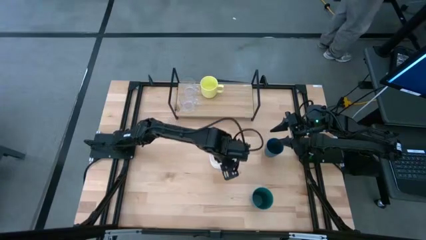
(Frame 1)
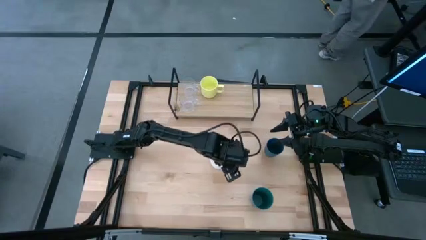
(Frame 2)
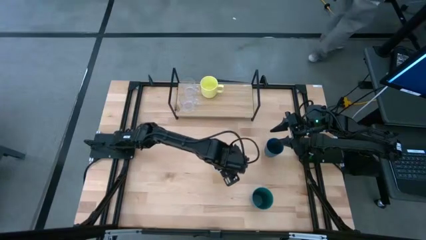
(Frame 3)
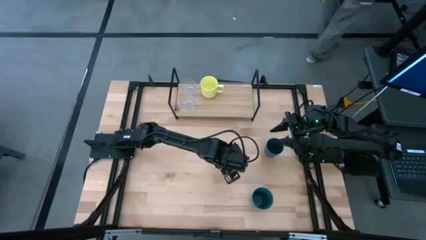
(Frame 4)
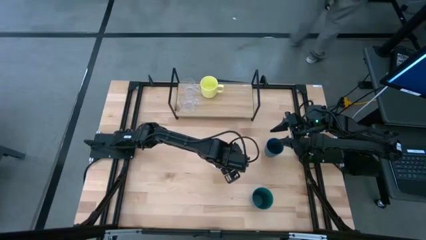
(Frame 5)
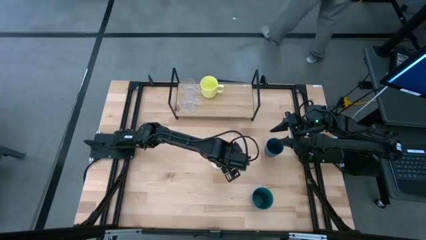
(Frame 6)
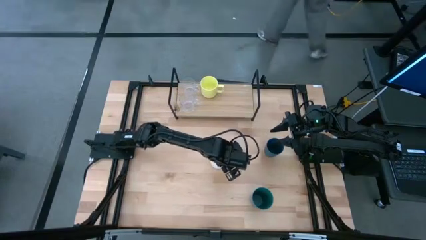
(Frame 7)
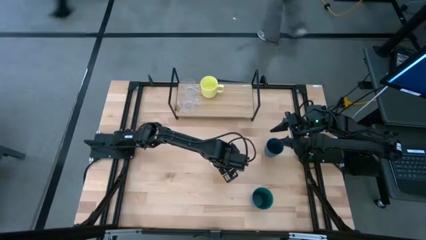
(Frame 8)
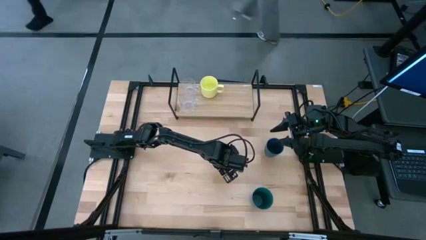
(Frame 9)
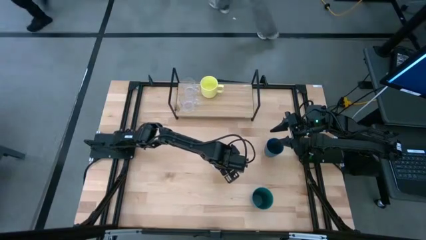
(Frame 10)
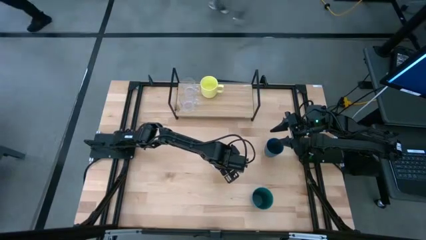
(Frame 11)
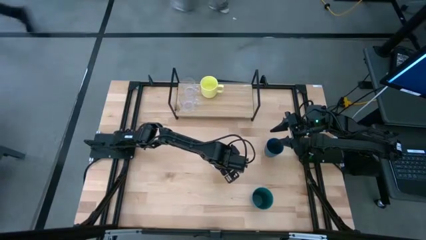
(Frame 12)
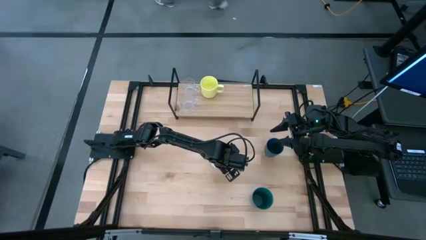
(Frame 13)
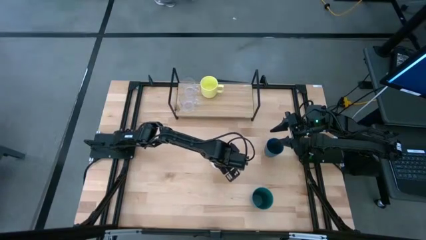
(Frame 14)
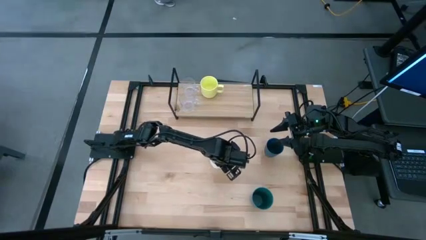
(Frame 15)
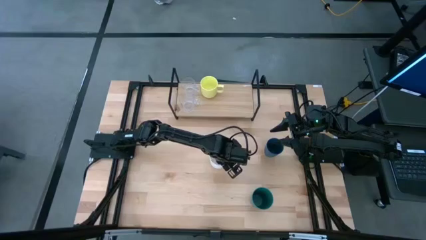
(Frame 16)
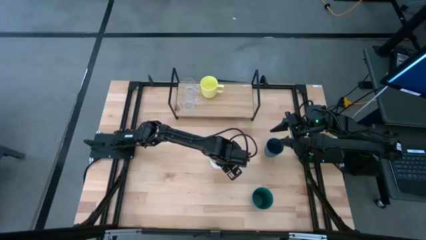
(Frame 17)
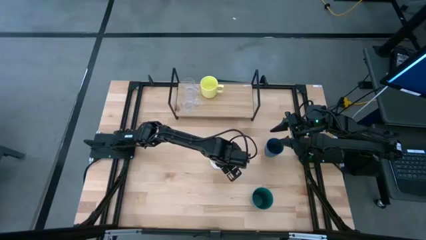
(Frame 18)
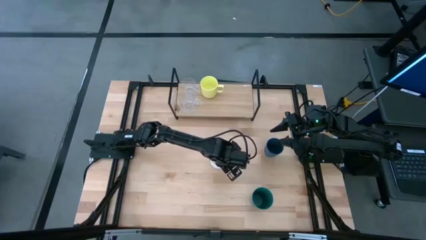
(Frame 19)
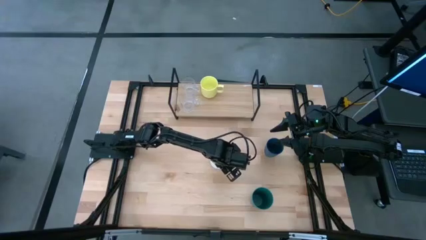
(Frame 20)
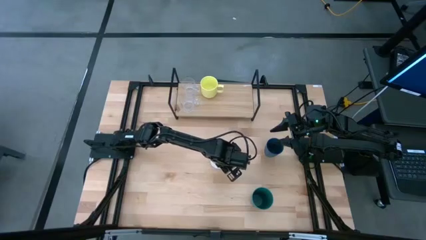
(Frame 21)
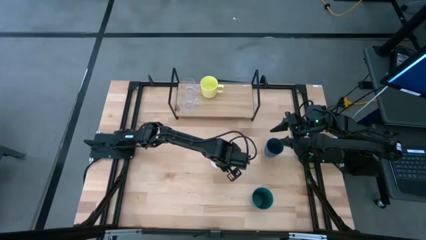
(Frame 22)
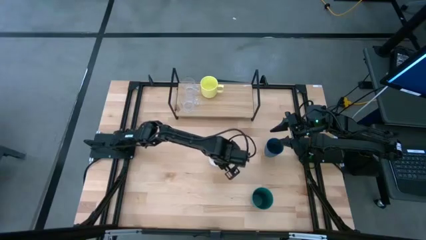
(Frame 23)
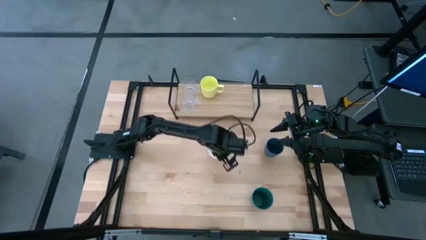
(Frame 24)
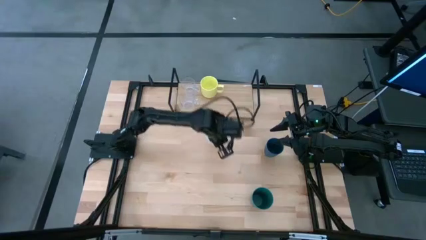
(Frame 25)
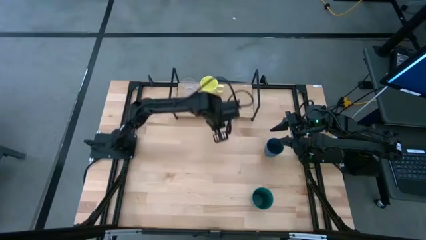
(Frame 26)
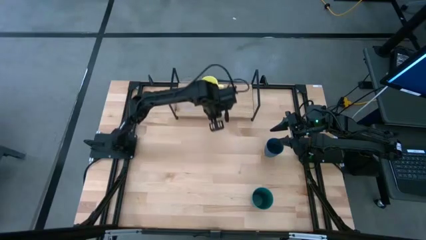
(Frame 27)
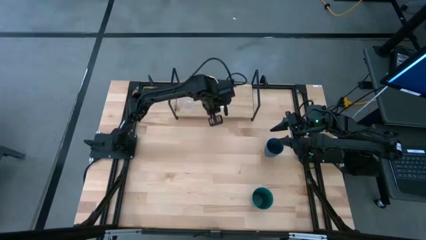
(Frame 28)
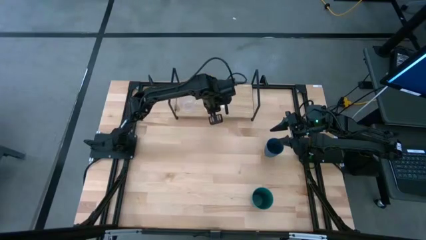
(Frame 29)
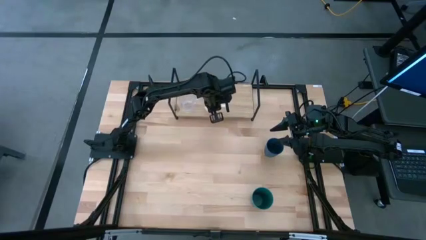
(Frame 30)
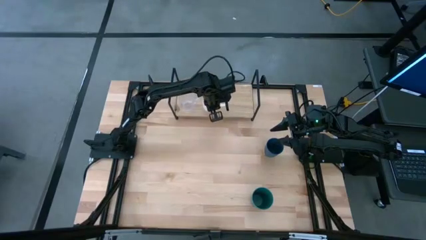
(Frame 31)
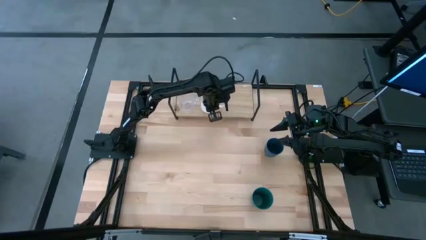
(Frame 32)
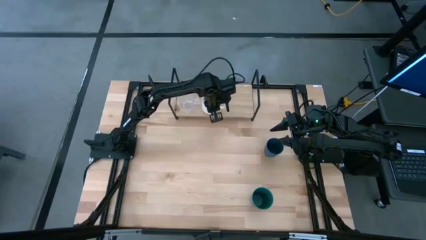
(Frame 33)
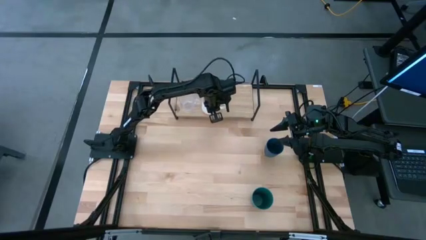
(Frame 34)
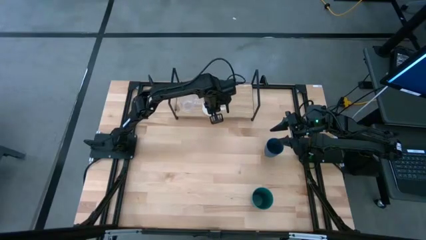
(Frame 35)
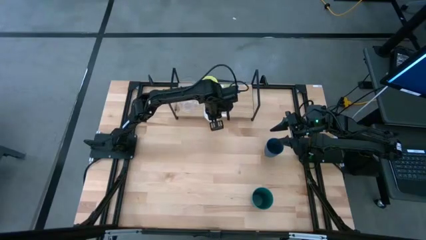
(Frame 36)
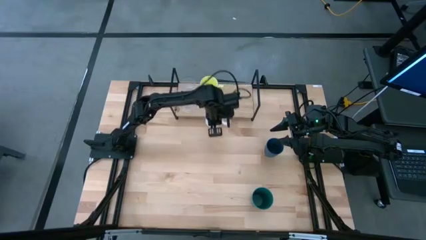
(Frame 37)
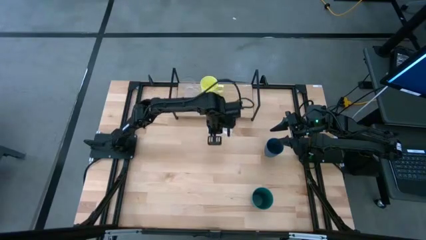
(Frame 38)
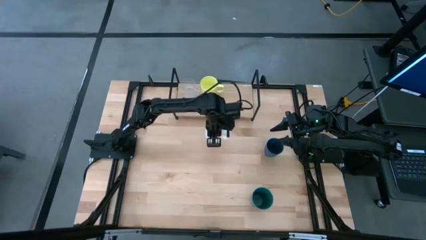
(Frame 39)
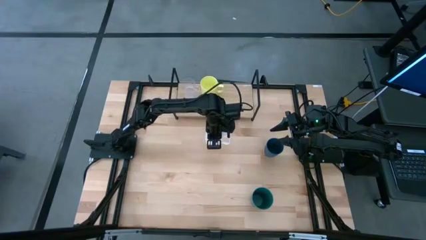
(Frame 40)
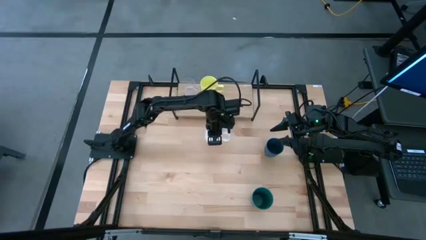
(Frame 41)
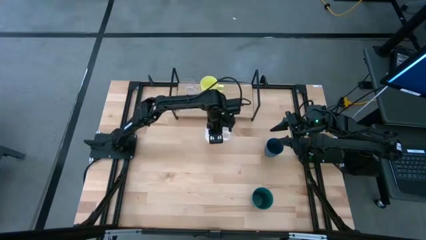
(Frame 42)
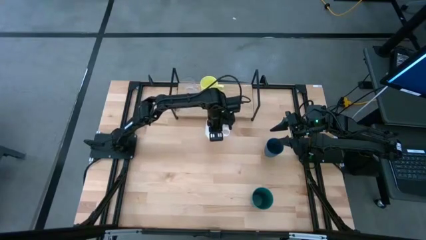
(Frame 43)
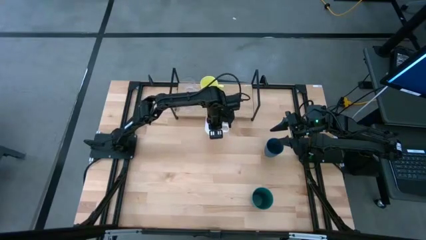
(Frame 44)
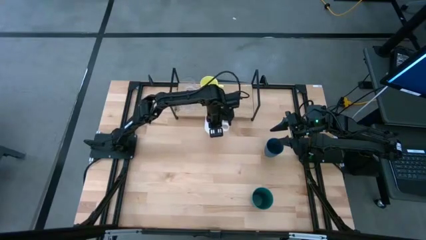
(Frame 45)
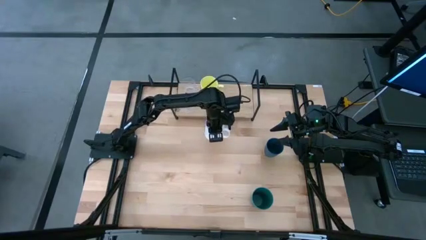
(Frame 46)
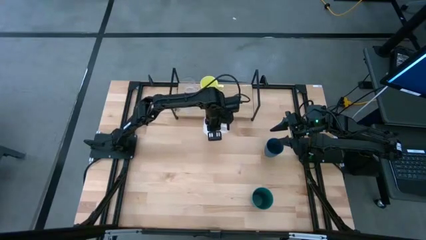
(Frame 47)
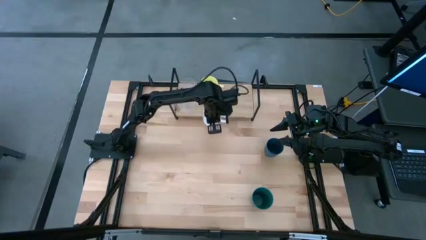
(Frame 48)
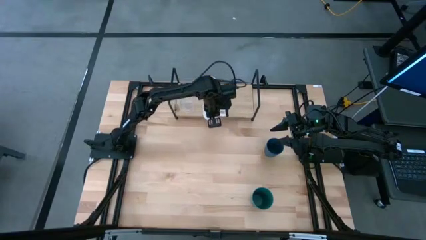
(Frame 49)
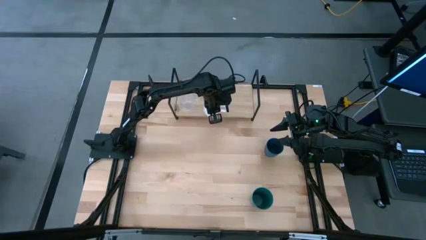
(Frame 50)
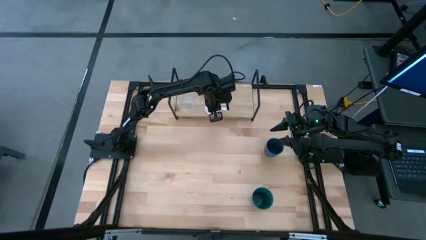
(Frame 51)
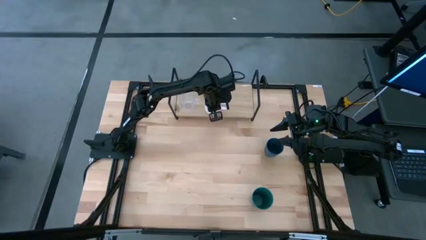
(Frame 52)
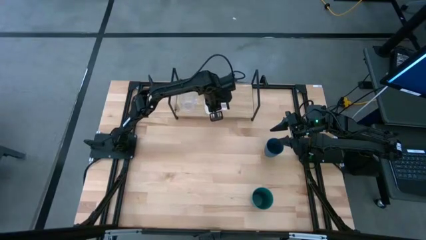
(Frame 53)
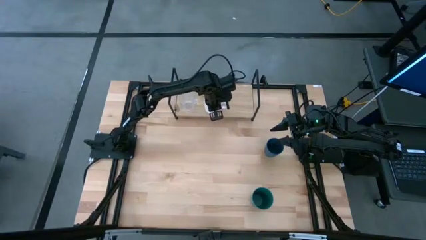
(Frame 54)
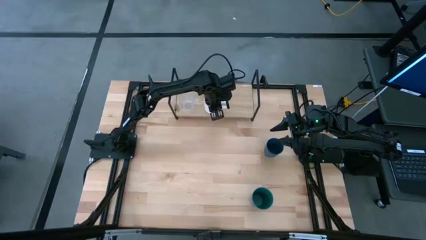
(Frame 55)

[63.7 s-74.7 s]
Task: Stack small to large cups/mugs on shelf
Put the white mug on the shelf

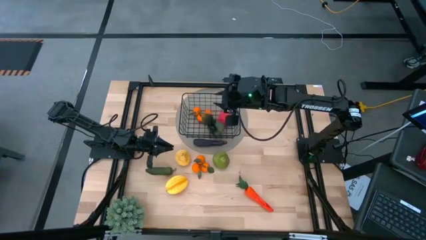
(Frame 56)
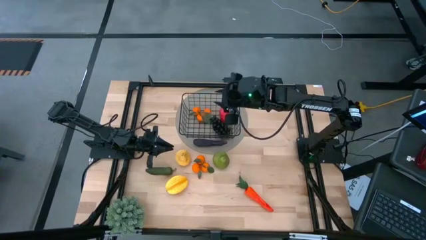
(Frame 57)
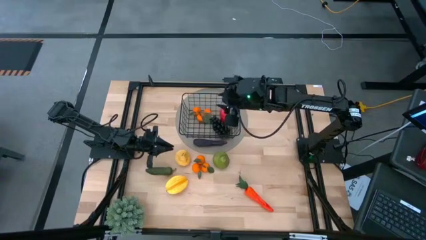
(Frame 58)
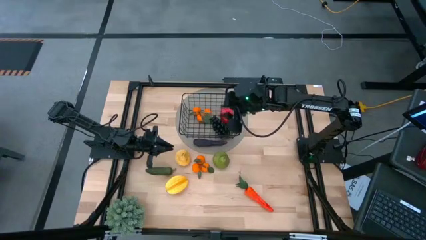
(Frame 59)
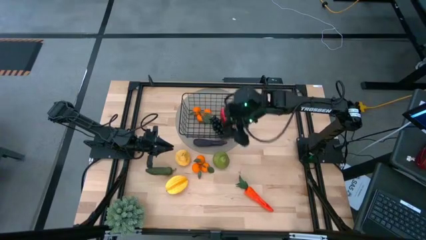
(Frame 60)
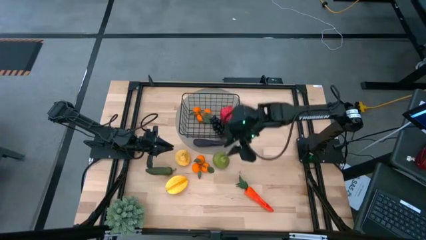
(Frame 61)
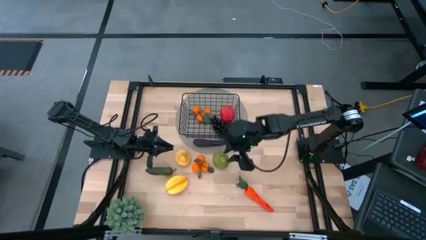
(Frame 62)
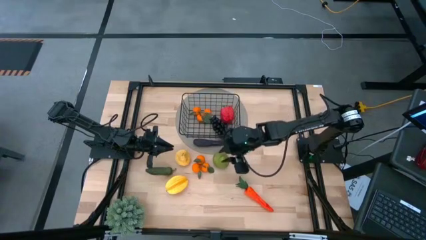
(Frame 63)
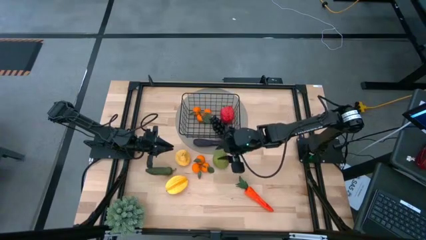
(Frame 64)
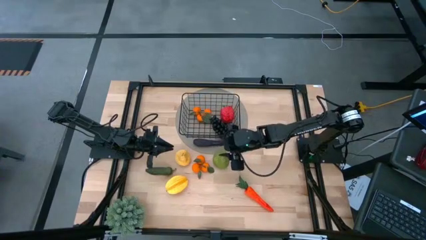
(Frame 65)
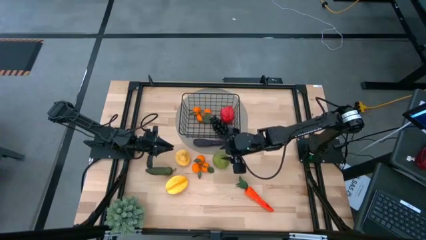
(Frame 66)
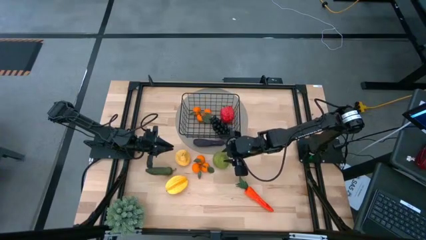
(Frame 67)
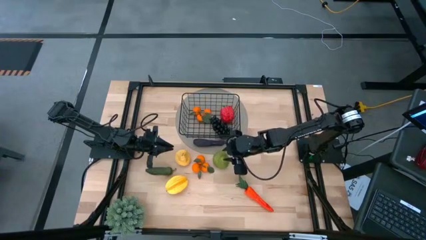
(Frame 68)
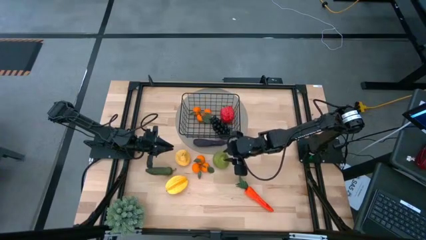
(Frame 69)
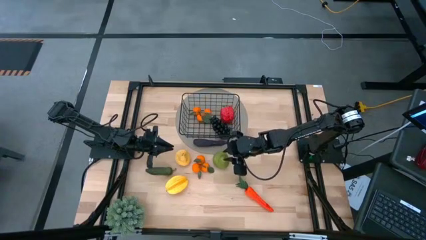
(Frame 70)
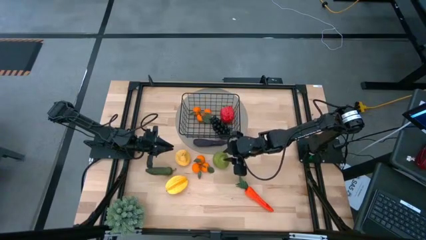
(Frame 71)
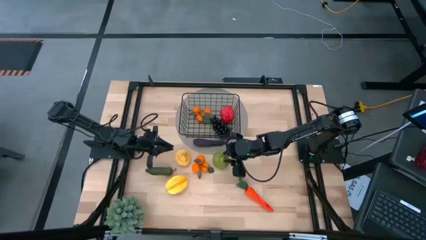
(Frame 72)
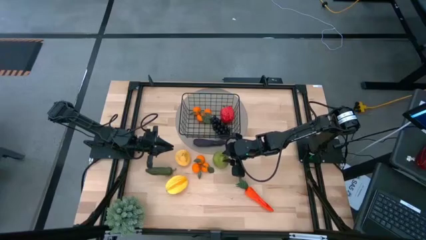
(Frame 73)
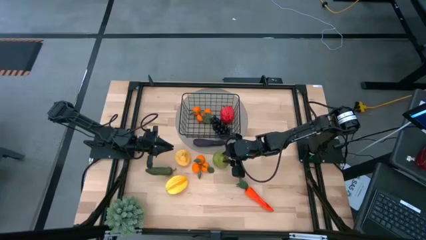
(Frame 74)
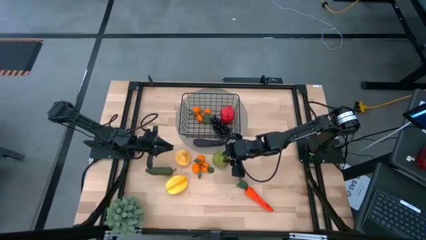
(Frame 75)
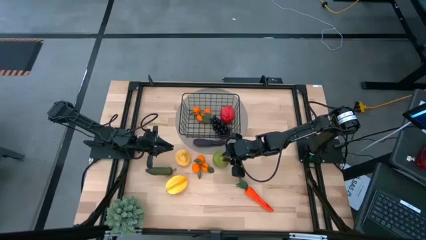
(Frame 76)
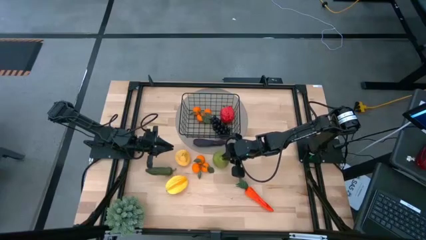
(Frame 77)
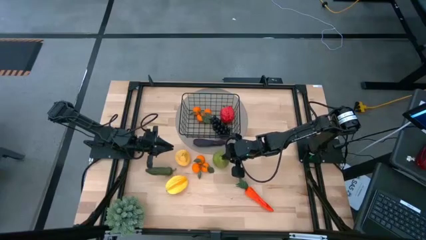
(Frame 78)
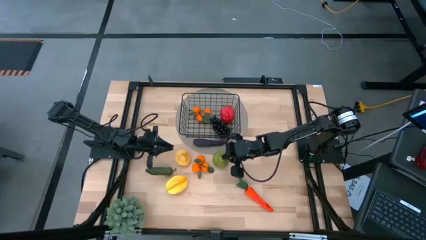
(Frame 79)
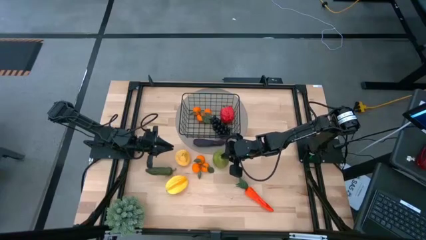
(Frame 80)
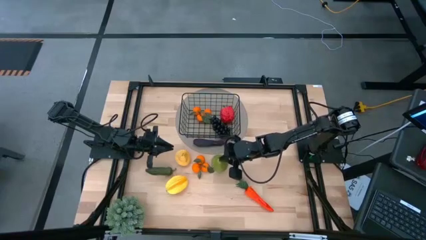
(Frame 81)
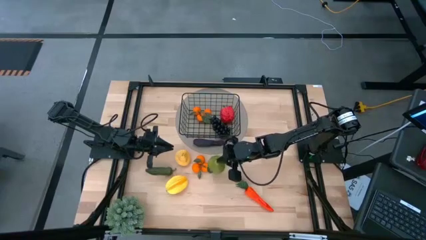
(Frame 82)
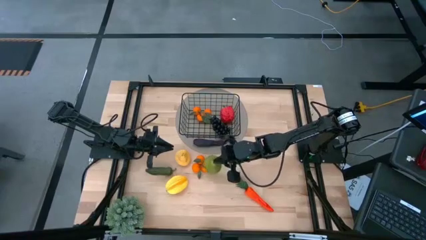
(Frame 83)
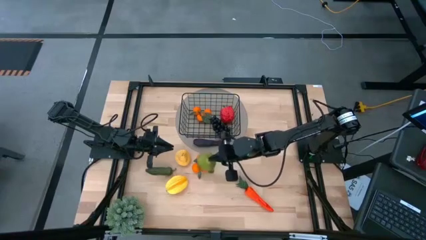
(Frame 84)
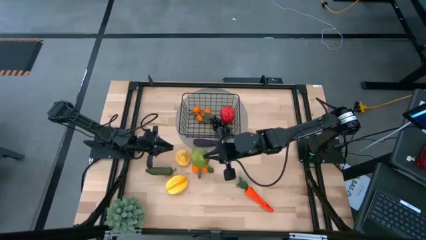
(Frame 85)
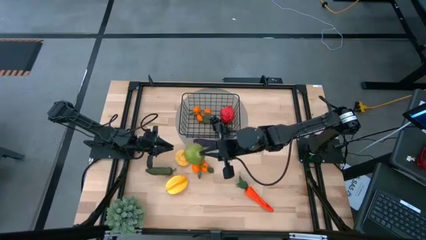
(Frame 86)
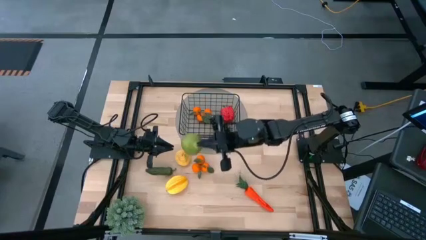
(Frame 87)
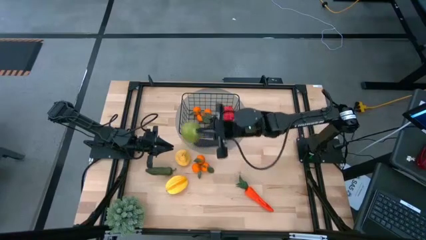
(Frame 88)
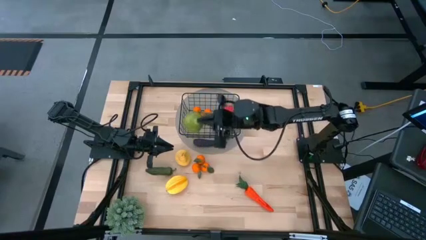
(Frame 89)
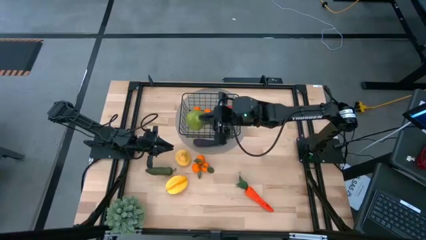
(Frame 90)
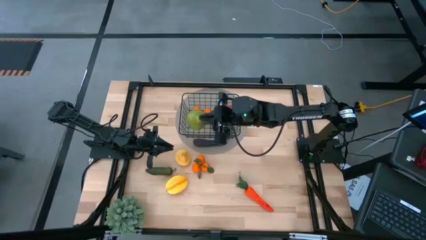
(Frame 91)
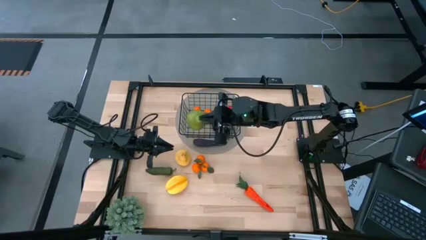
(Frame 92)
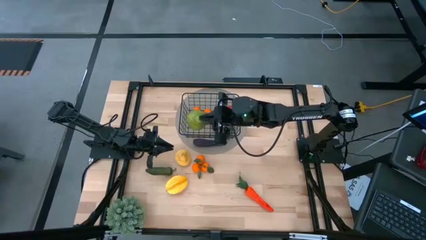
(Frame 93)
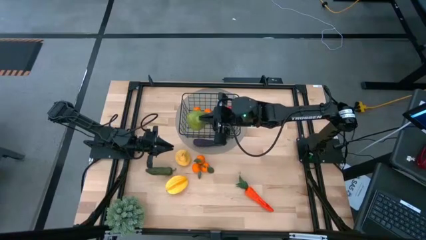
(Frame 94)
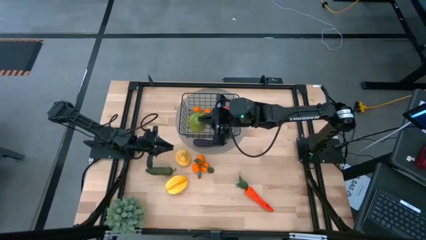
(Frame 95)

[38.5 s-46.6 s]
Task: Build produce basket
Put the green pear into the wire organizer
